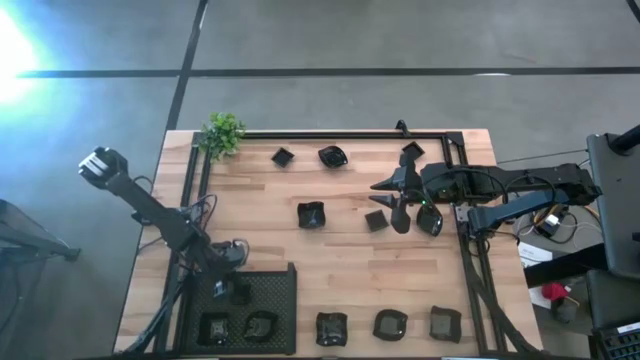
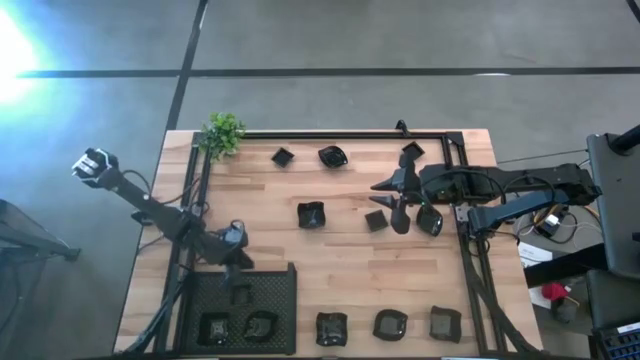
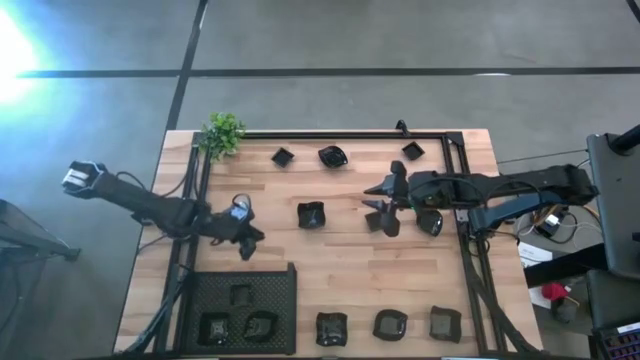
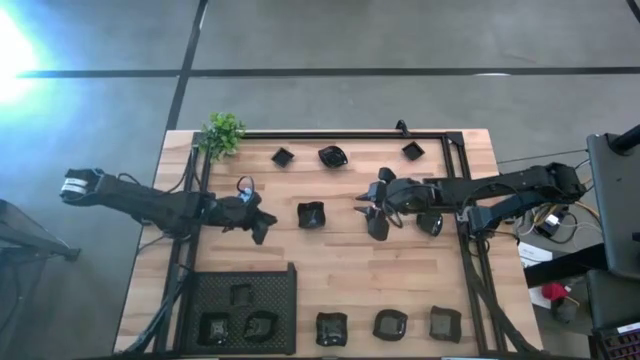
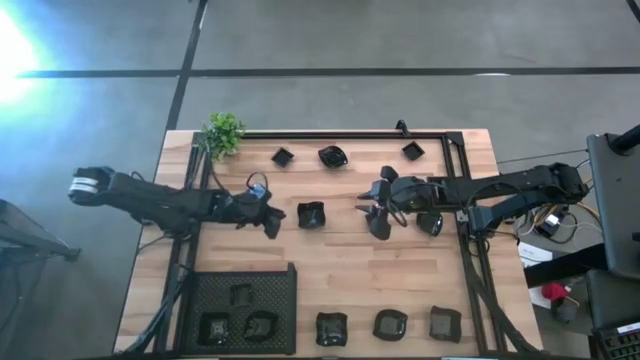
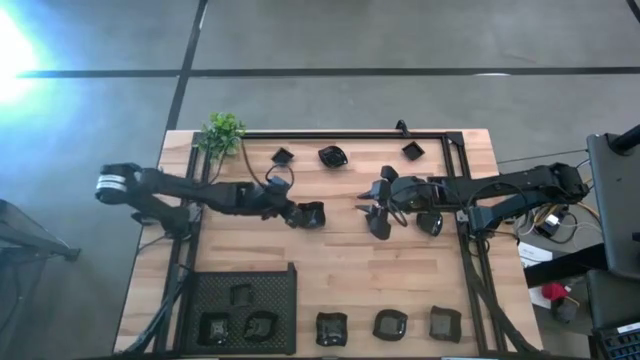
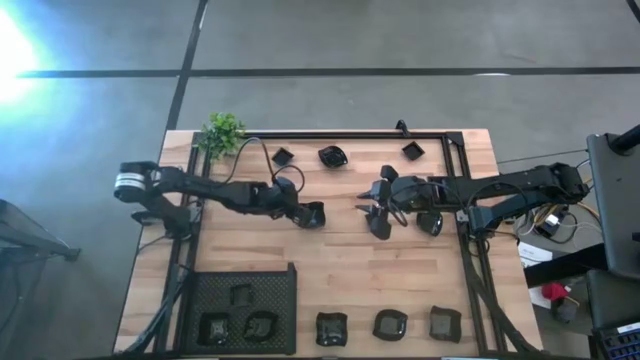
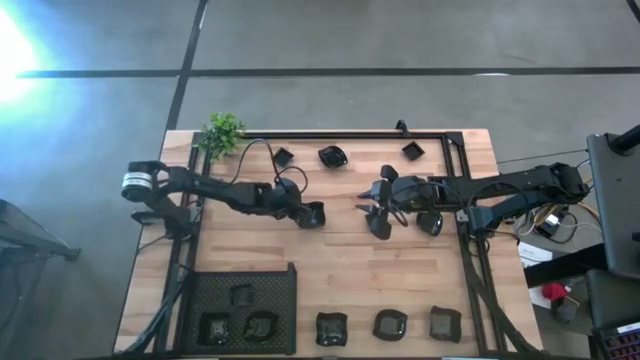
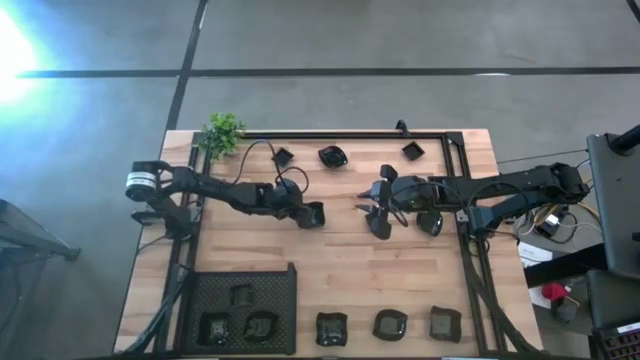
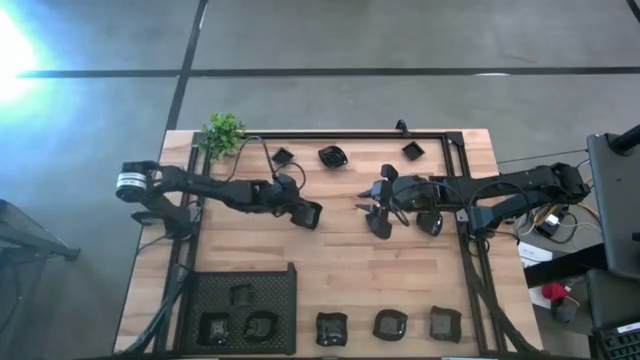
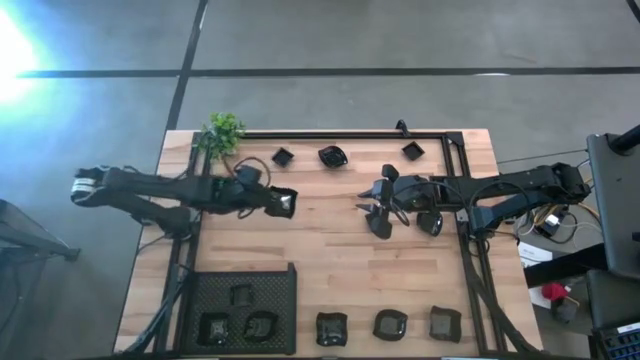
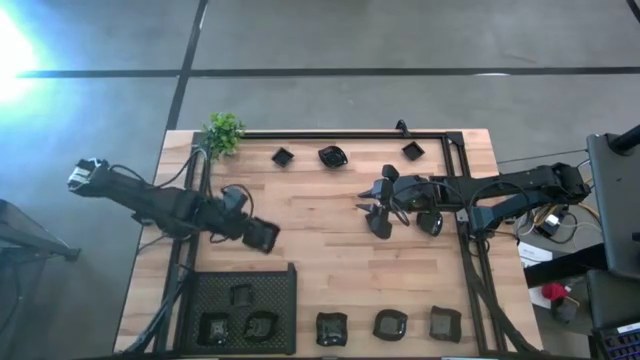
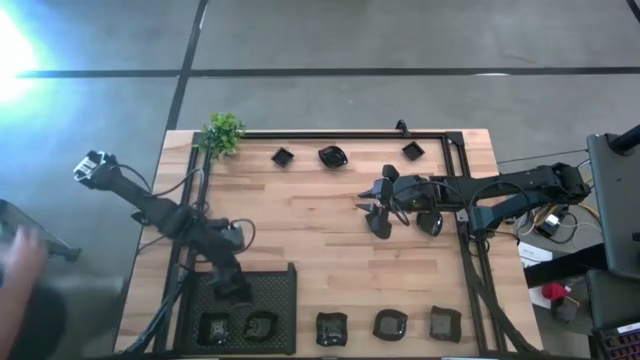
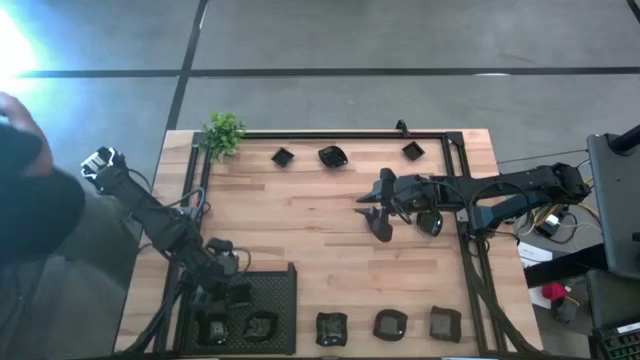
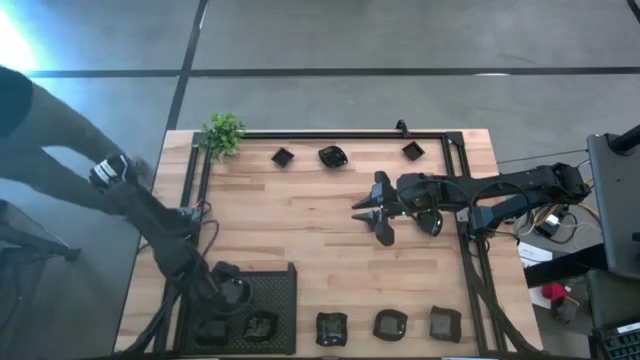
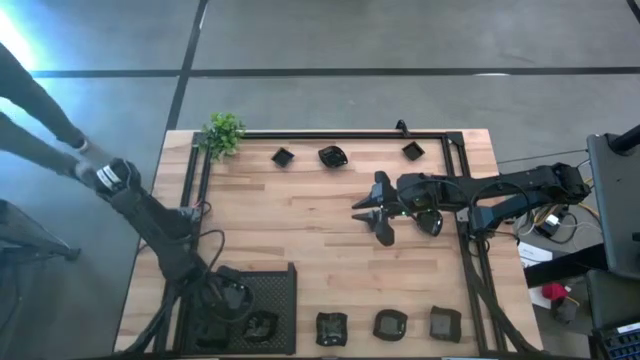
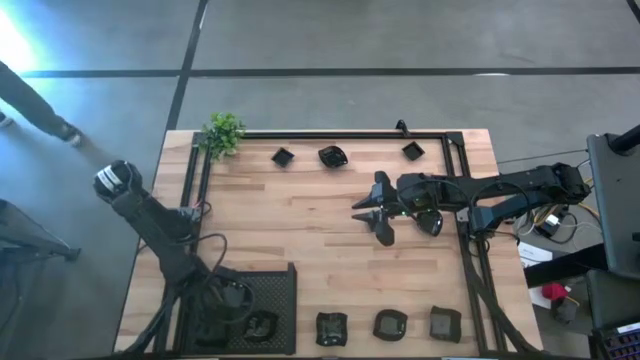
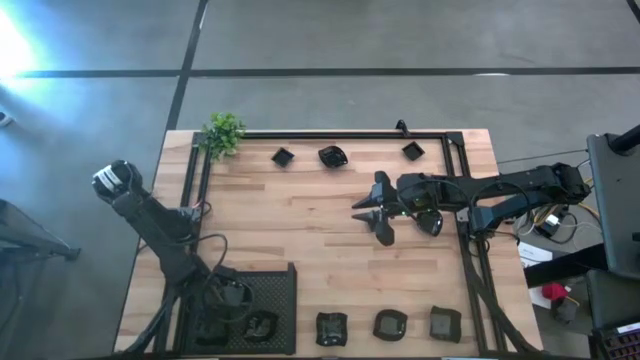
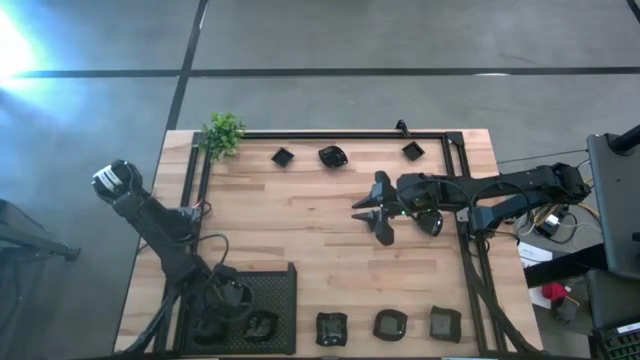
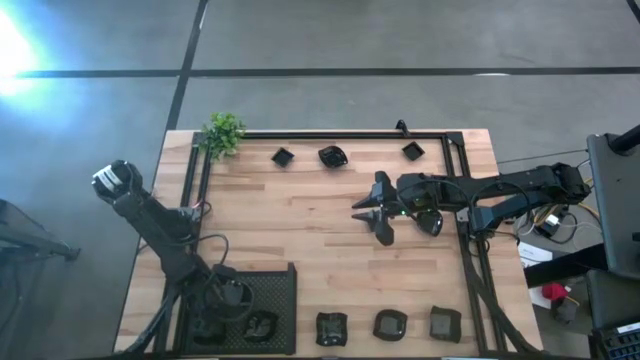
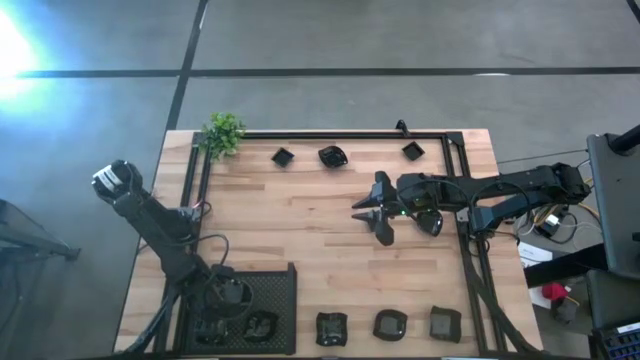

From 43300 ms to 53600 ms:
Task: Pick & Place Mini shaped plates
Stack the distorted square plate on top of the distorted square plate on the shelf

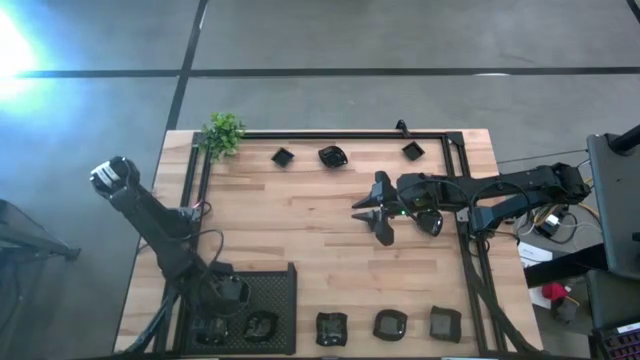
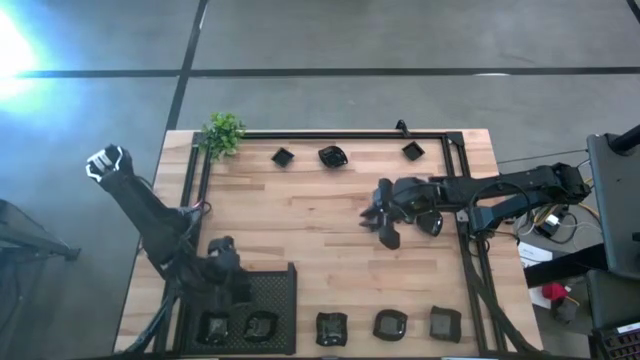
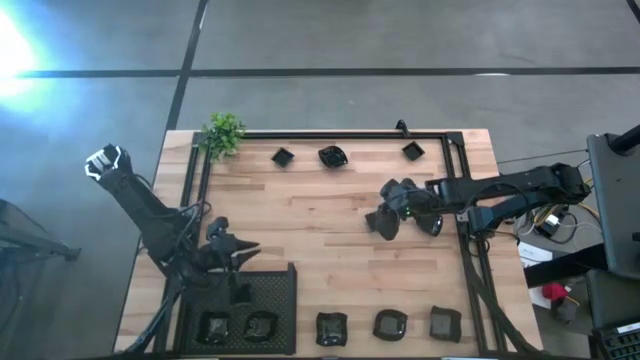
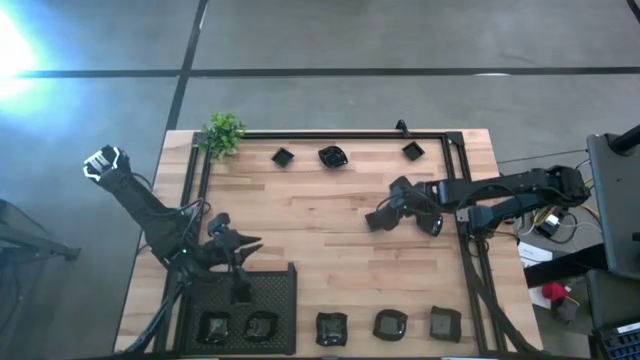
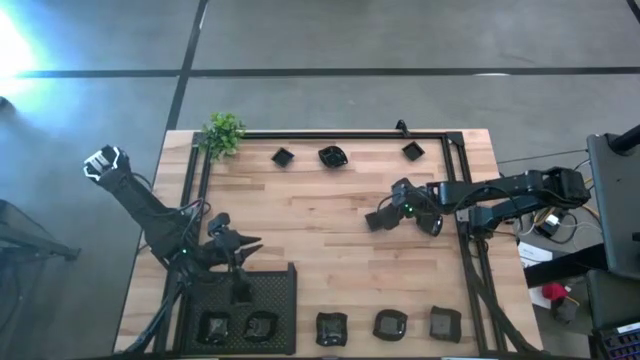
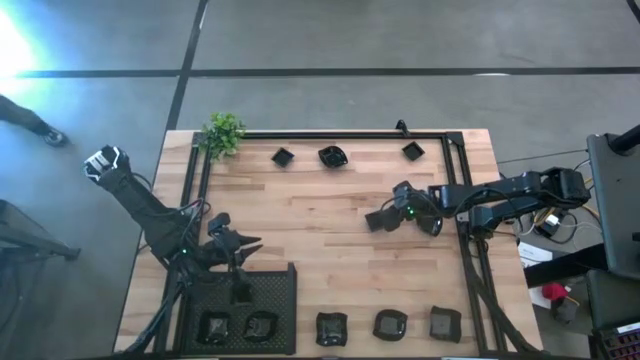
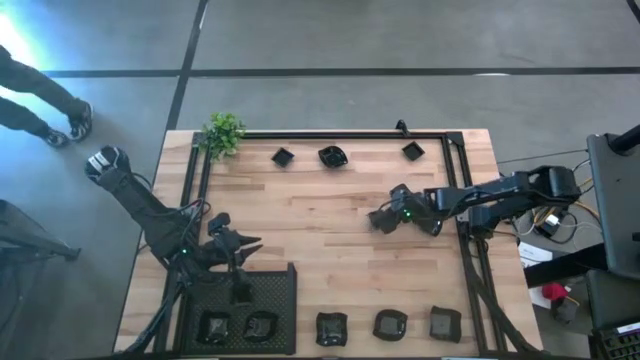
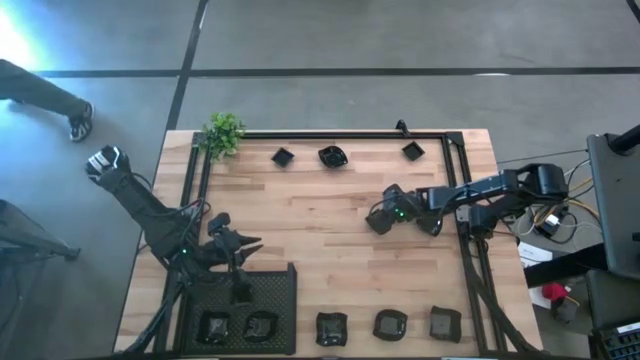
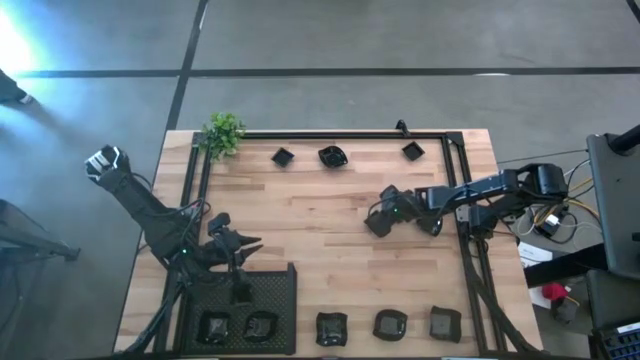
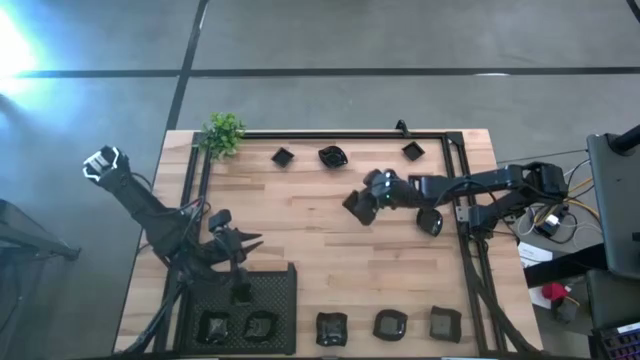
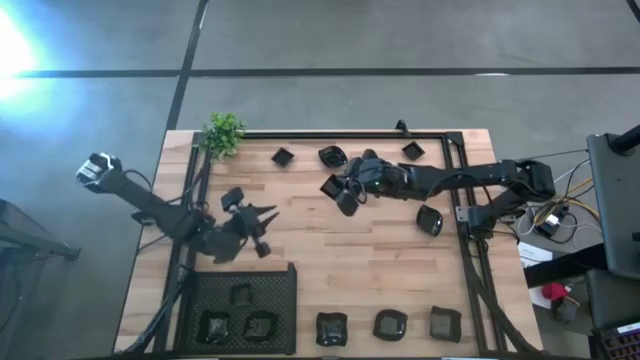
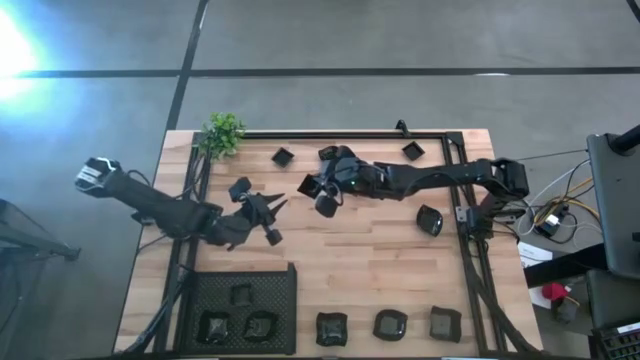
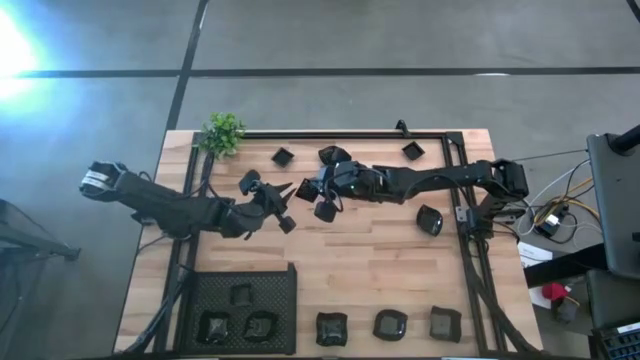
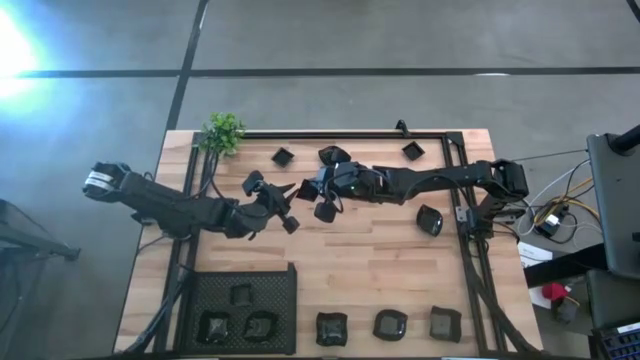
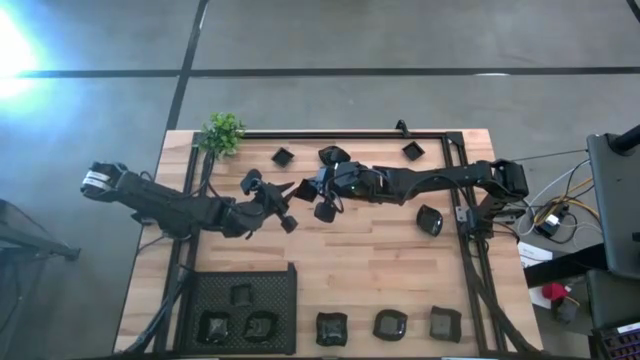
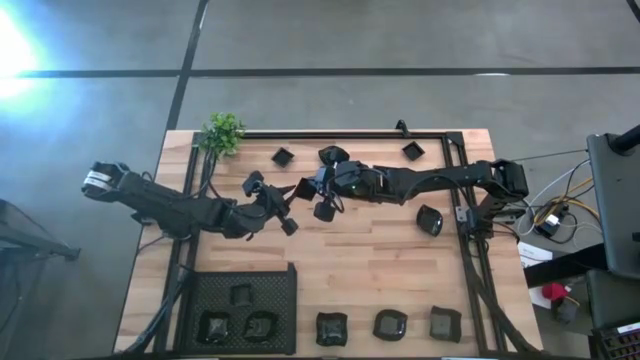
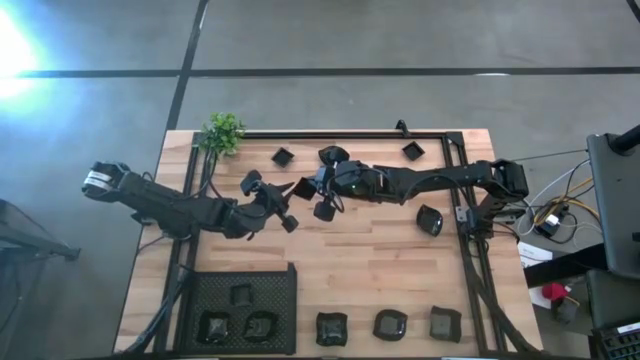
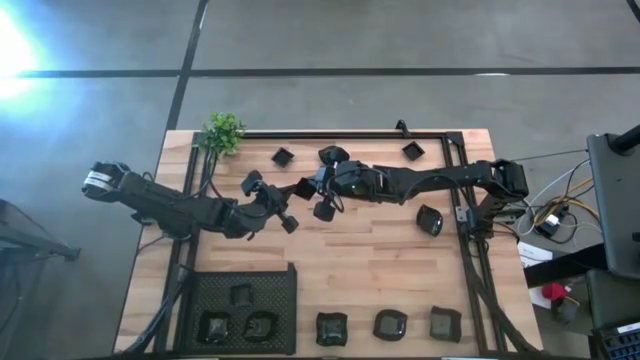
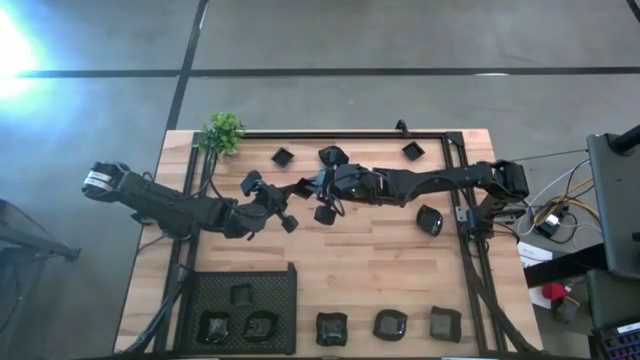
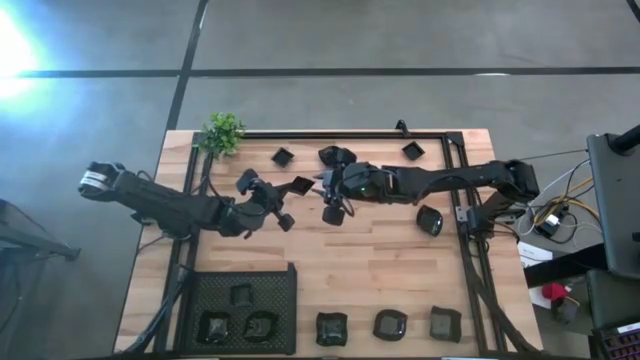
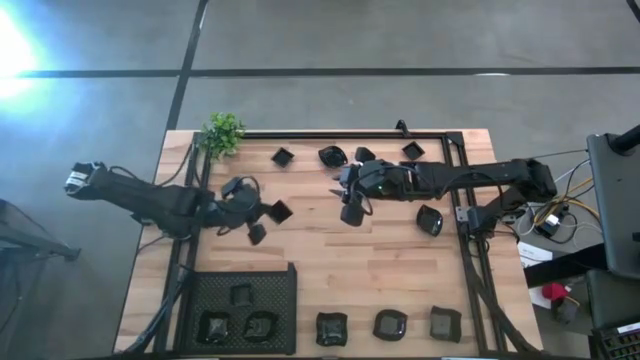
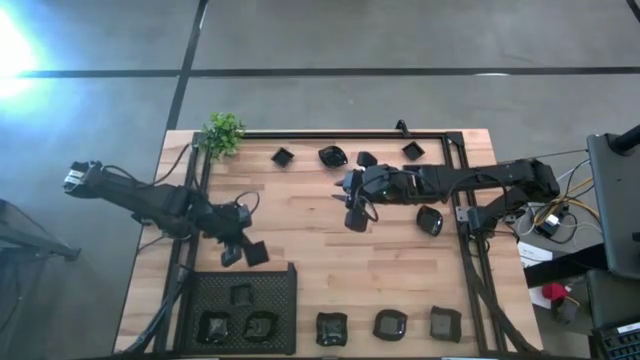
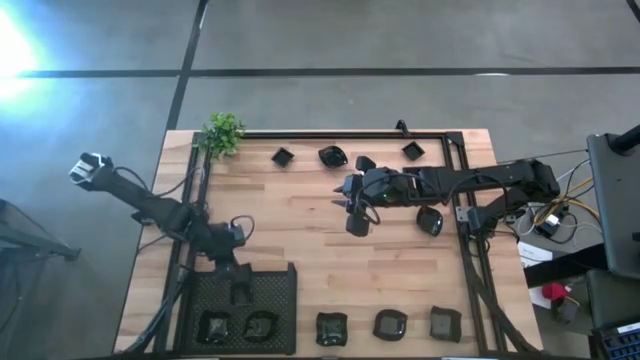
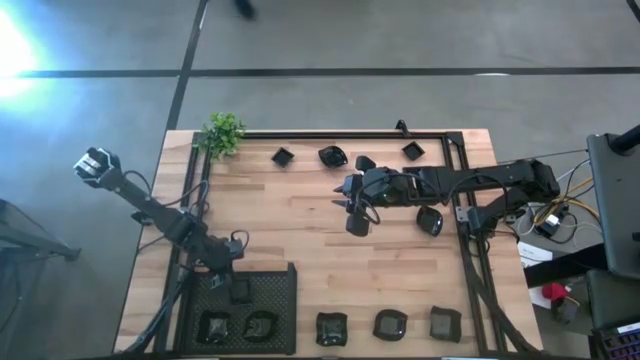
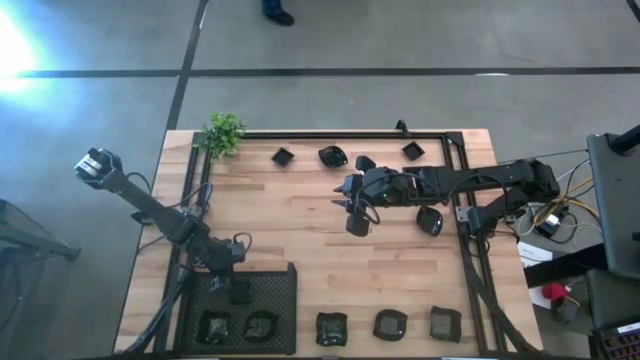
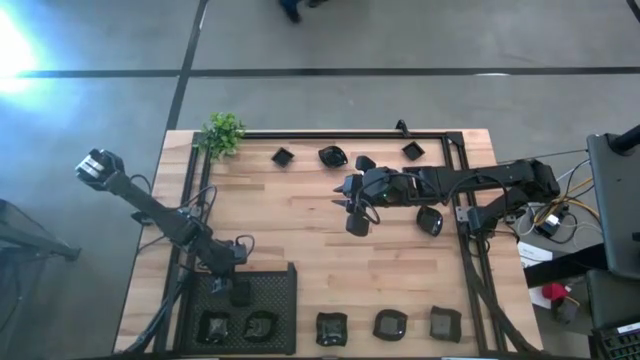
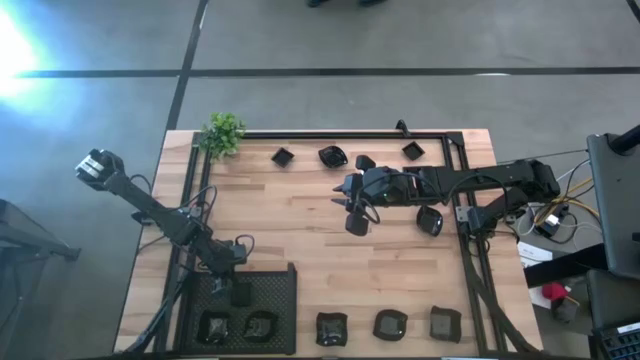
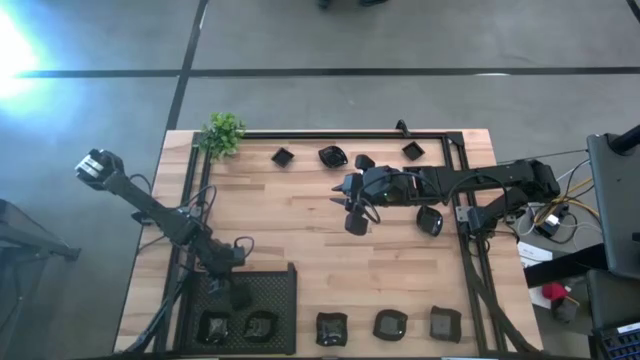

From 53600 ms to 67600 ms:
Stack the square plate on top of the square plate on the shelf
